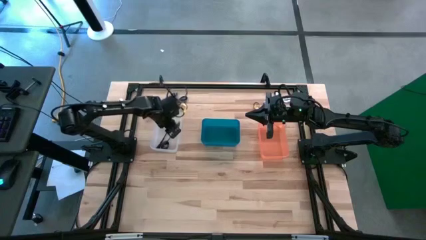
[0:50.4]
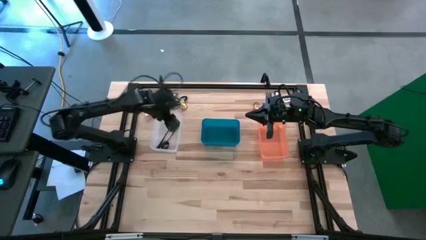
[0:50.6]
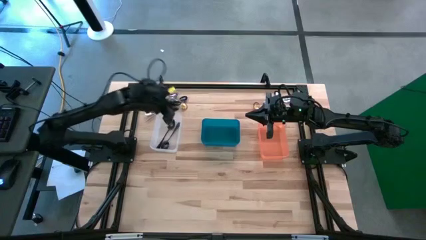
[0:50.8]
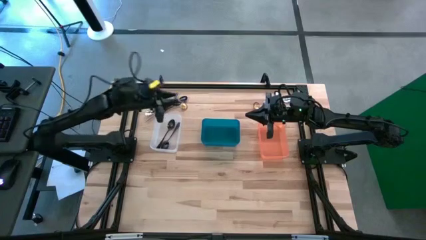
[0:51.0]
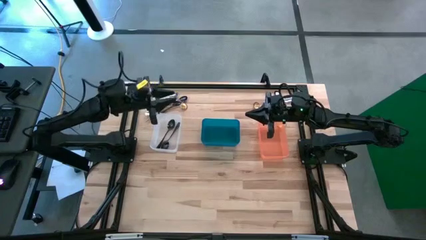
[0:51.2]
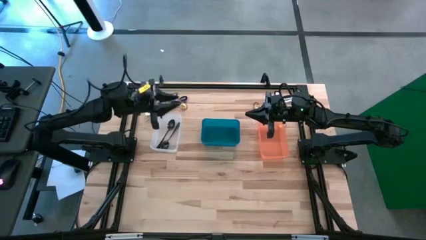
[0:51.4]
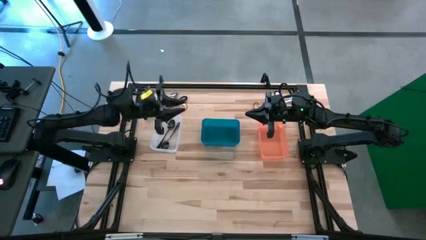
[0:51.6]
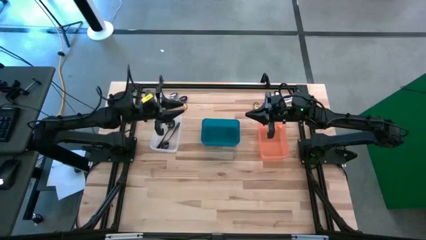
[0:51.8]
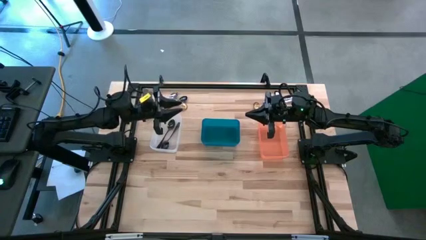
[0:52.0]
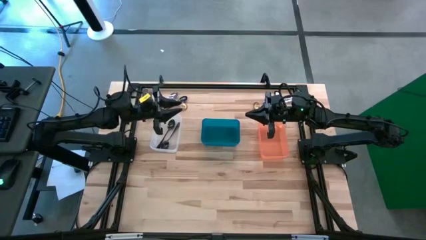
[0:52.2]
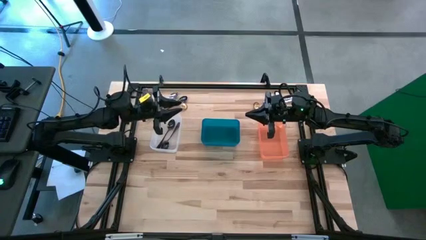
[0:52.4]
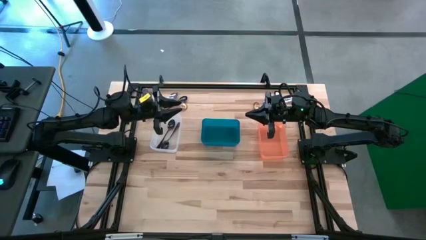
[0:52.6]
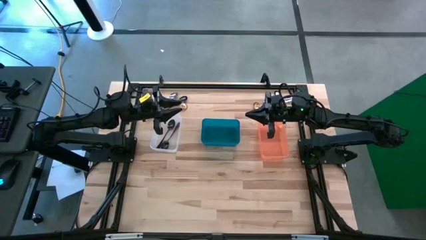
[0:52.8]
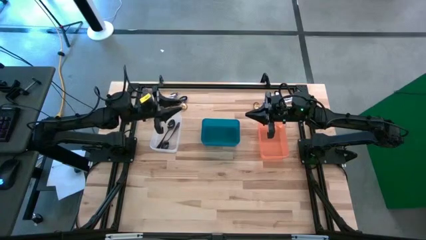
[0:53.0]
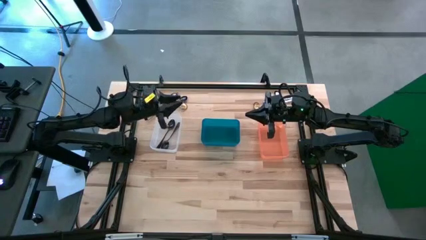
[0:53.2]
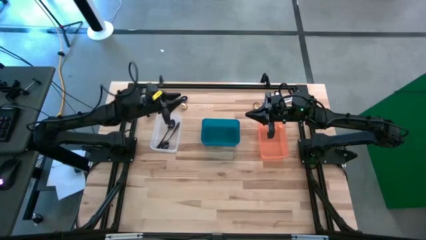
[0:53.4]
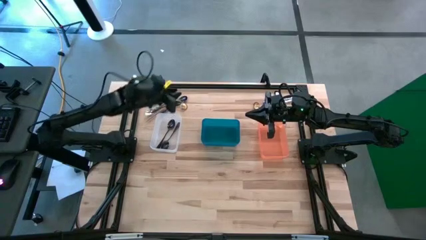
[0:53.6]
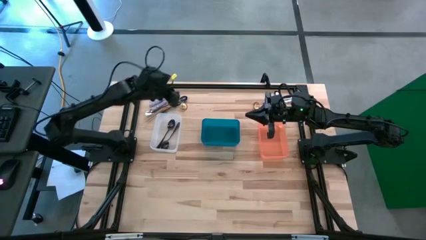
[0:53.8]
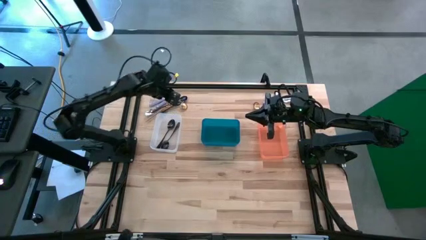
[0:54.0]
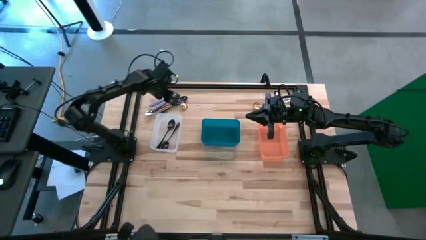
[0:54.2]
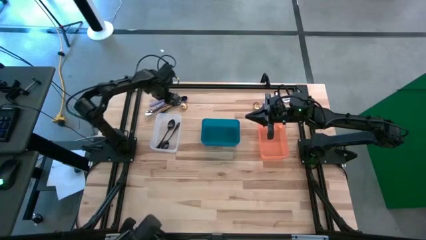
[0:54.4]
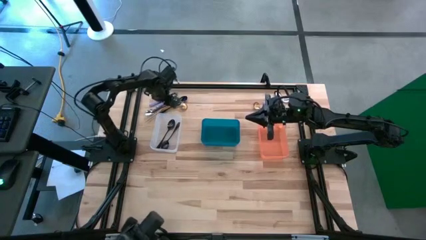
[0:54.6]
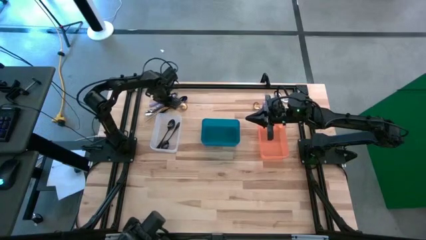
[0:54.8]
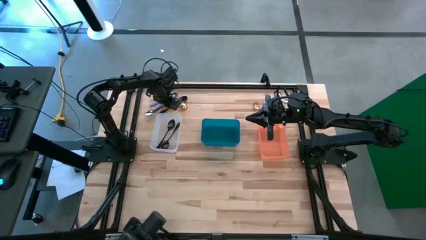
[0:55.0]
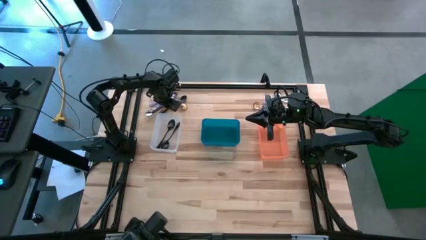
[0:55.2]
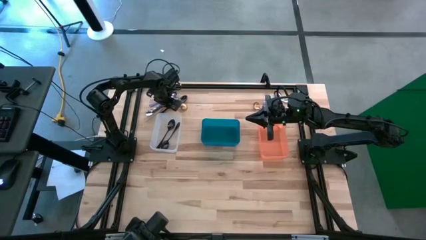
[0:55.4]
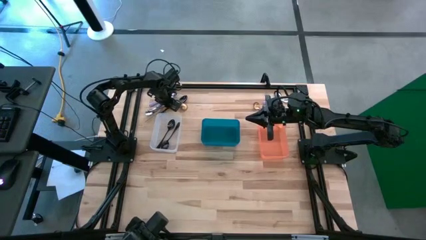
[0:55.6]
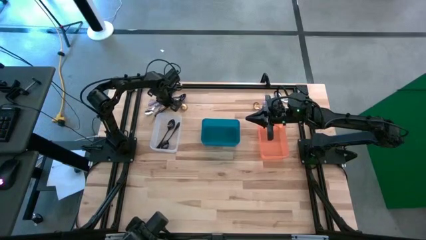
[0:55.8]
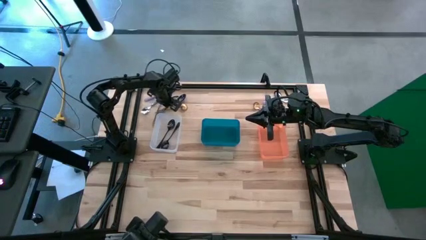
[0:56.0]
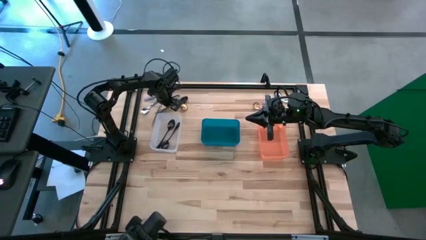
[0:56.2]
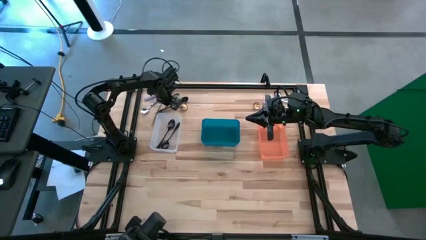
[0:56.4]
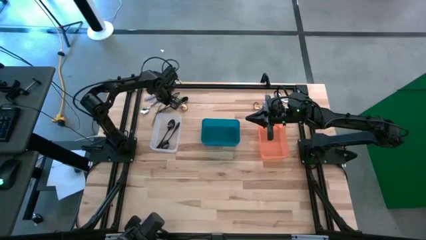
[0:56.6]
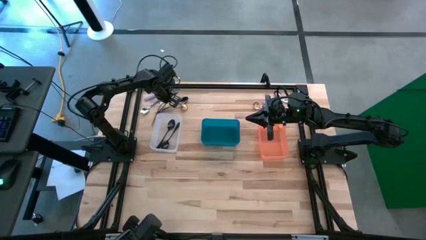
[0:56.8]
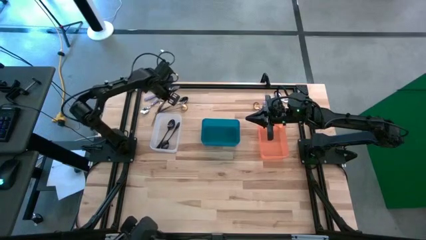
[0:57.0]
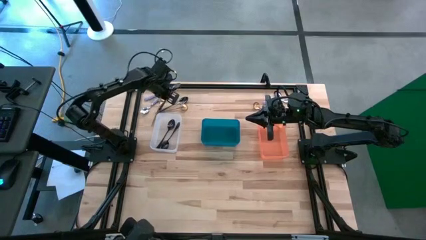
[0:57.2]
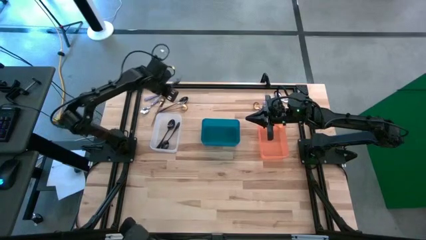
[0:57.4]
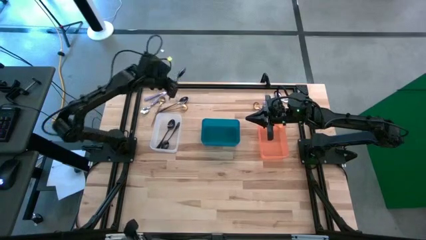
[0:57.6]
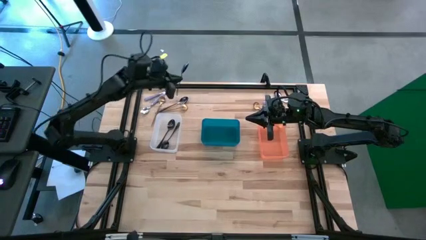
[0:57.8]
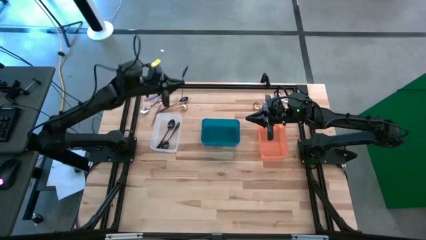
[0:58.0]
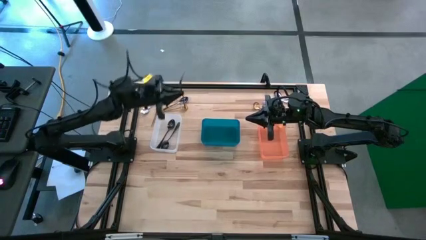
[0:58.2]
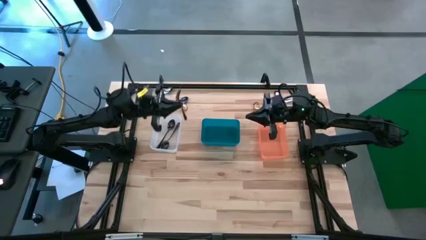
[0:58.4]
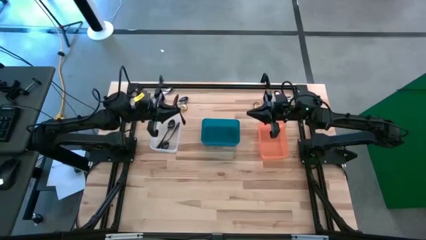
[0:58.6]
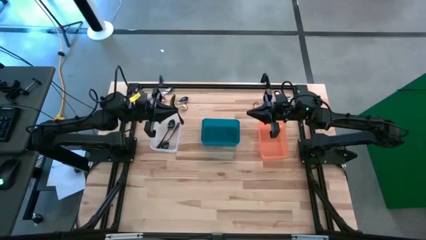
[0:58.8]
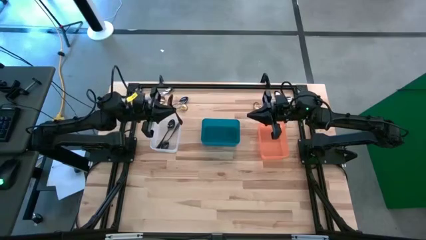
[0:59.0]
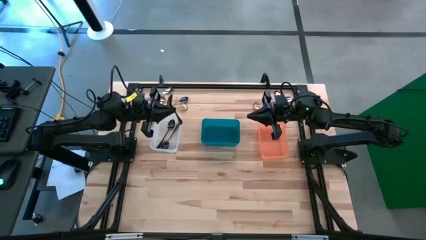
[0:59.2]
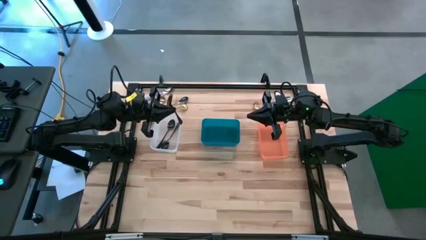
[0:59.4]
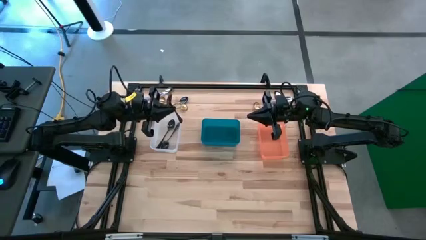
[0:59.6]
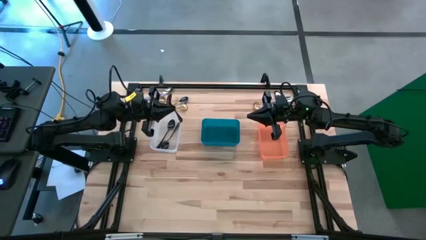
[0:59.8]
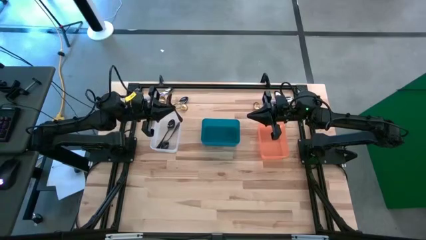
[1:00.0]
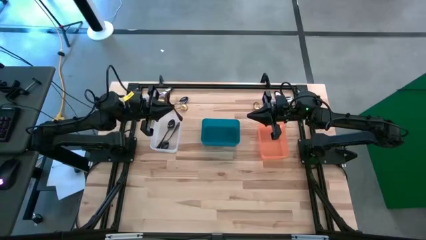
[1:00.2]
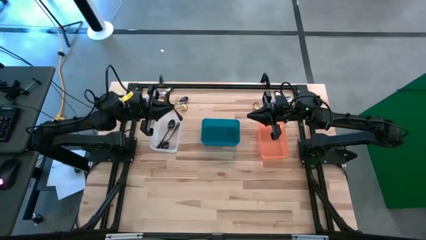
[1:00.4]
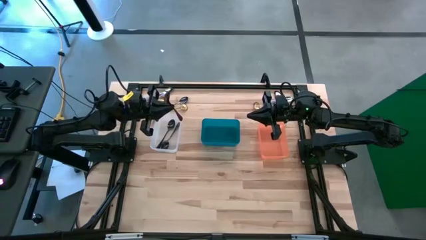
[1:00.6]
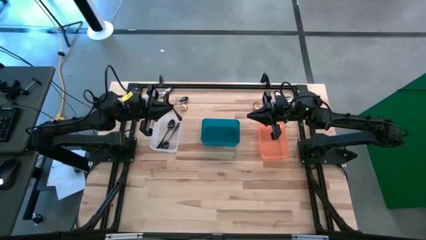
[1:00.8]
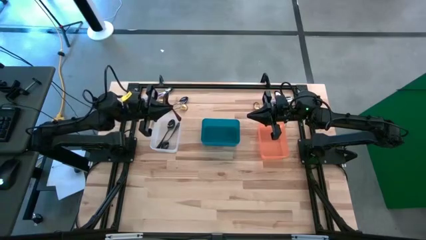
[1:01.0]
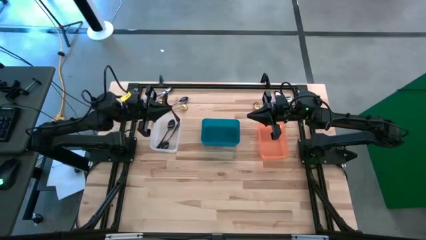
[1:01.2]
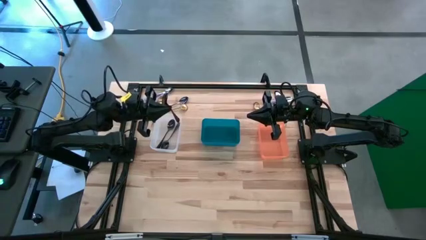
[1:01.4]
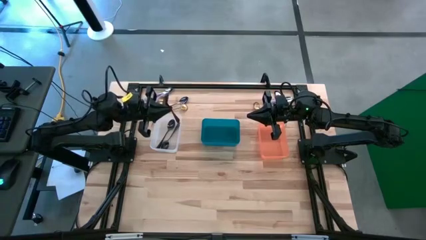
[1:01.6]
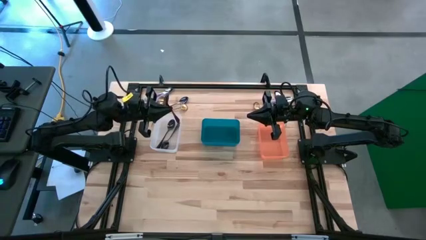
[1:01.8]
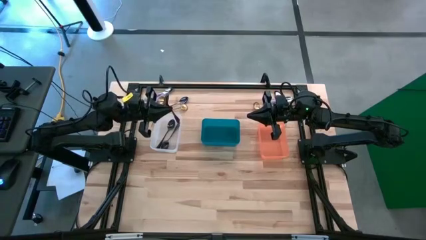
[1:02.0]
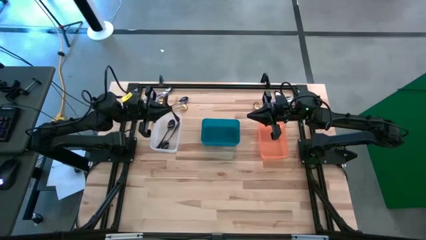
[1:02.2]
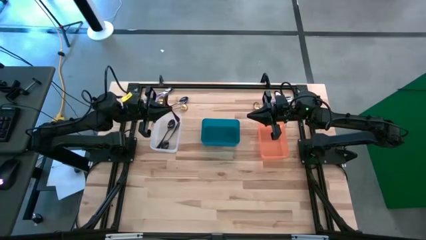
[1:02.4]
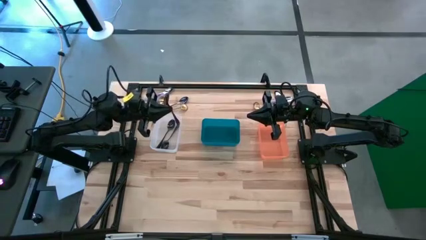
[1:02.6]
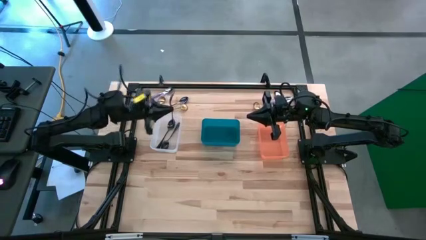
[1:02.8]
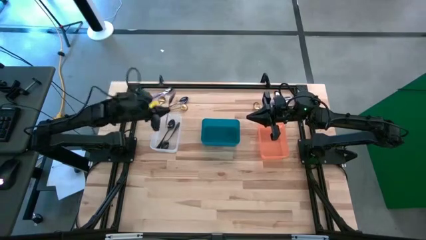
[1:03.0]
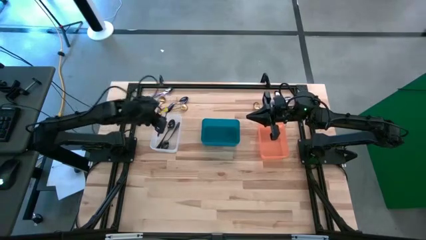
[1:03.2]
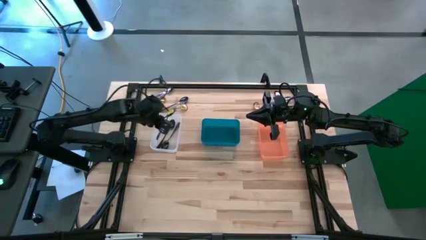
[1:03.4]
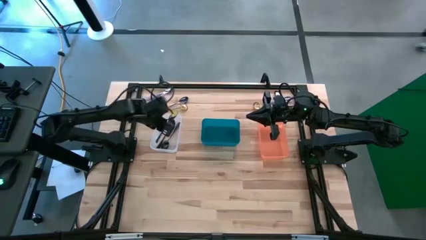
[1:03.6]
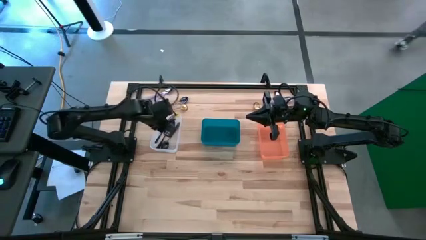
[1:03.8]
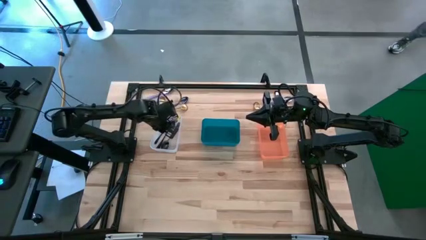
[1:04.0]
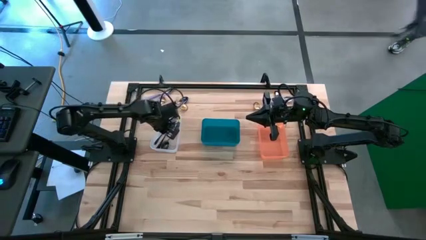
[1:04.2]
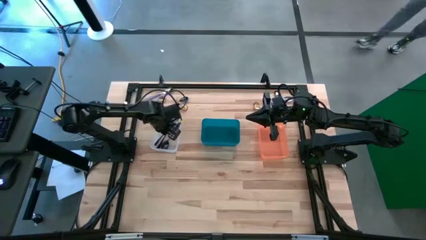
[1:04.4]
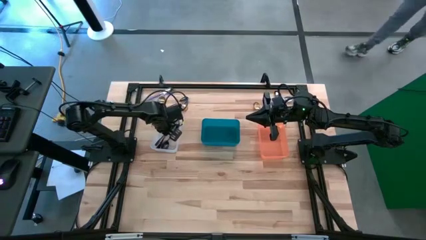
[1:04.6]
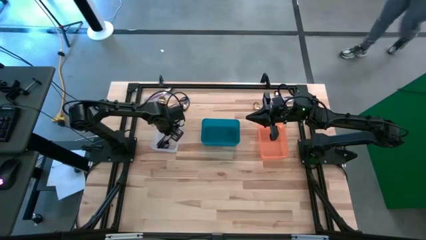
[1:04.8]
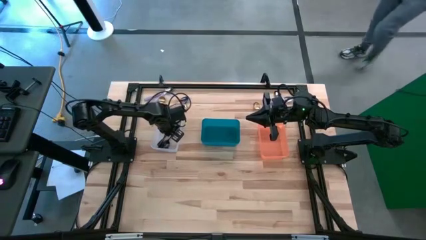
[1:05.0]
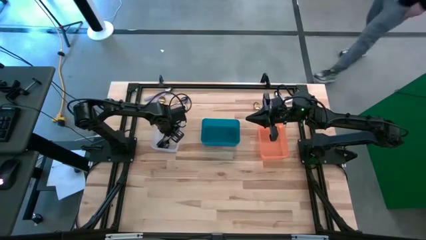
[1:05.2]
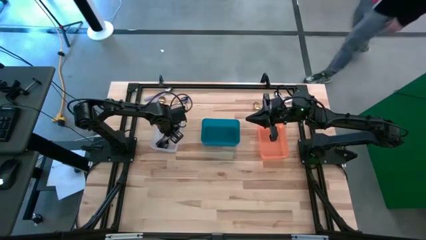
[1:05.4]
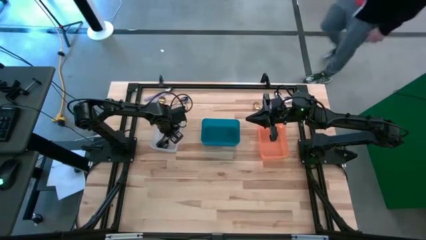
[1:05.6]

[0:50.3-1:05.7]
Task: Sort silverware by color (type)
Put the black spoon into the transparent bin
